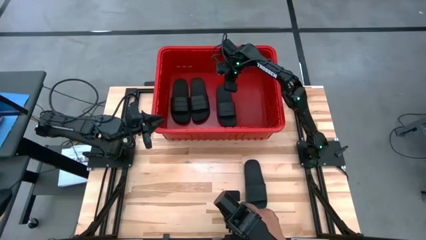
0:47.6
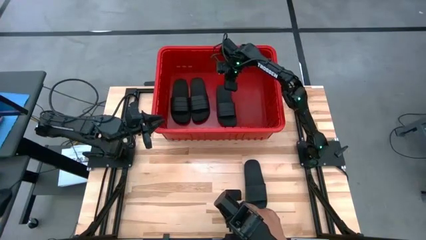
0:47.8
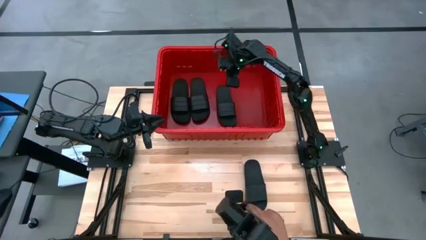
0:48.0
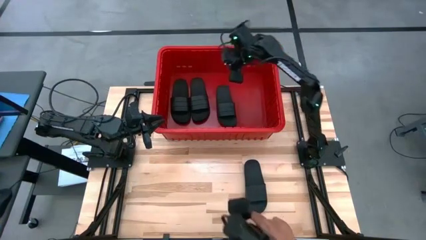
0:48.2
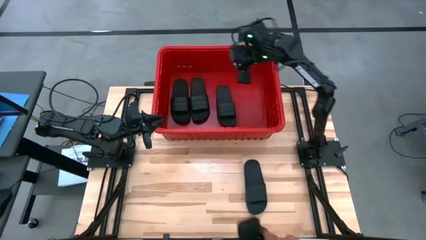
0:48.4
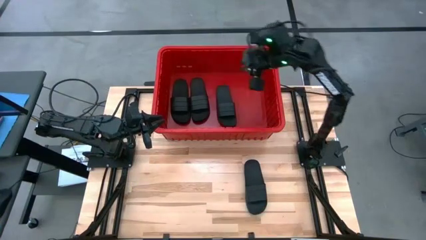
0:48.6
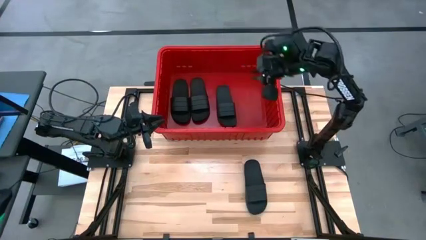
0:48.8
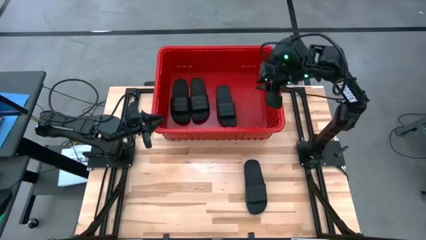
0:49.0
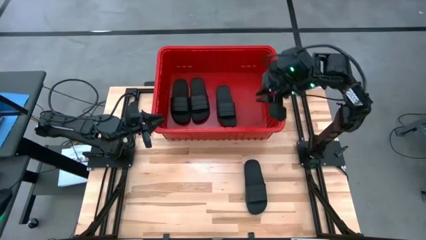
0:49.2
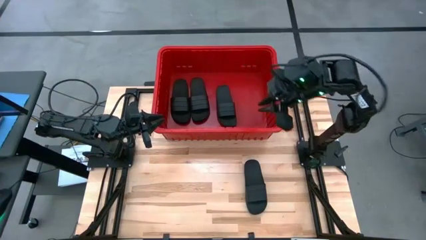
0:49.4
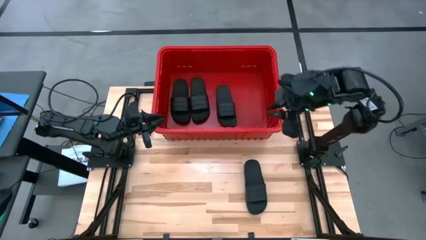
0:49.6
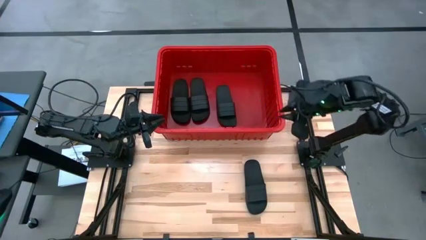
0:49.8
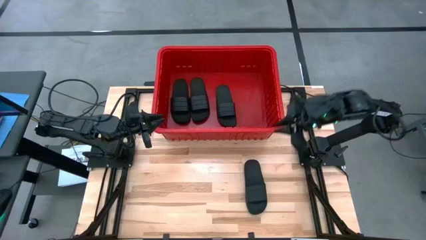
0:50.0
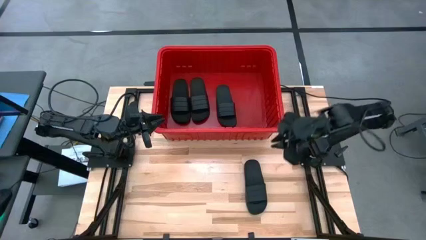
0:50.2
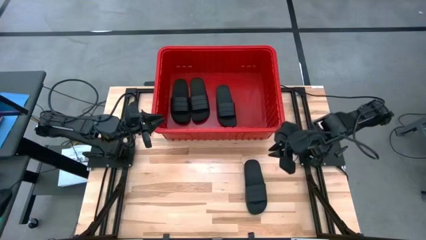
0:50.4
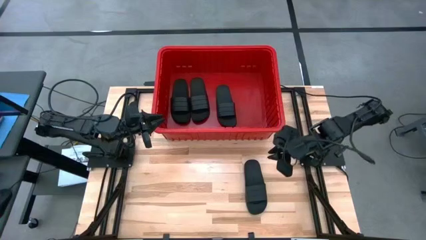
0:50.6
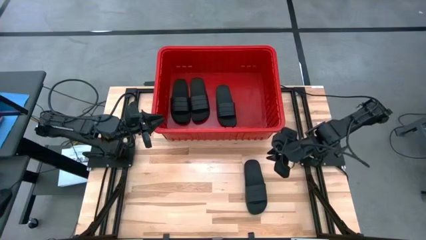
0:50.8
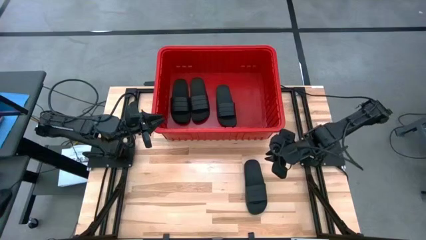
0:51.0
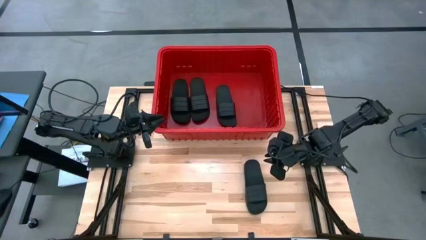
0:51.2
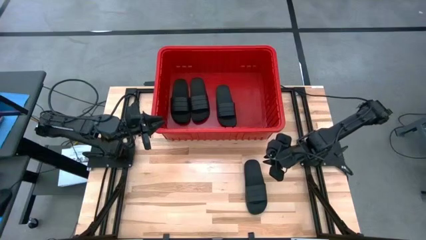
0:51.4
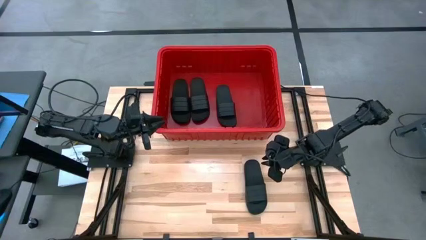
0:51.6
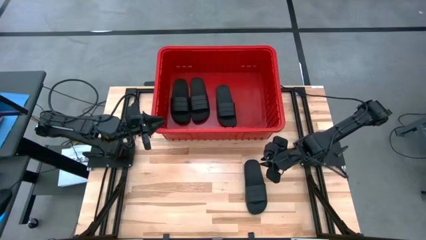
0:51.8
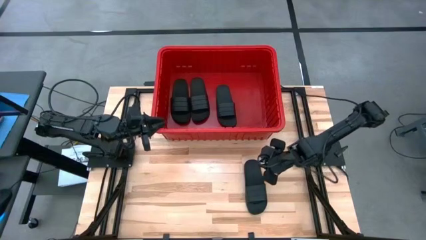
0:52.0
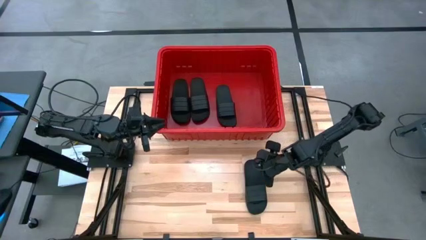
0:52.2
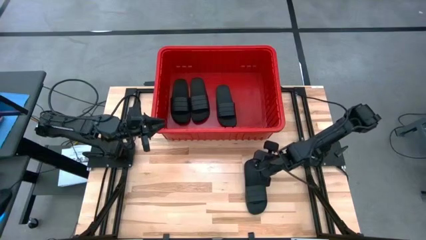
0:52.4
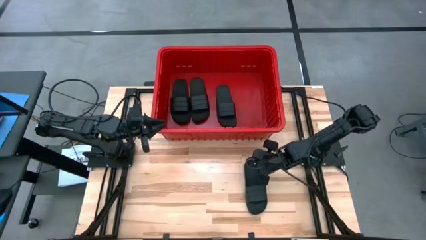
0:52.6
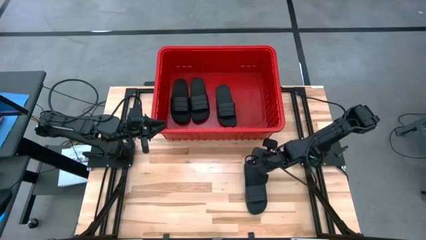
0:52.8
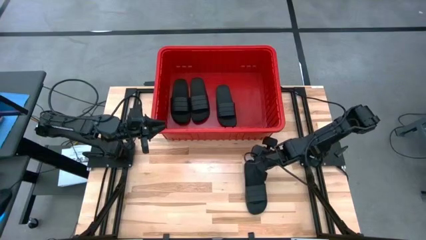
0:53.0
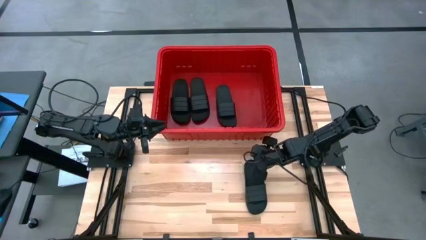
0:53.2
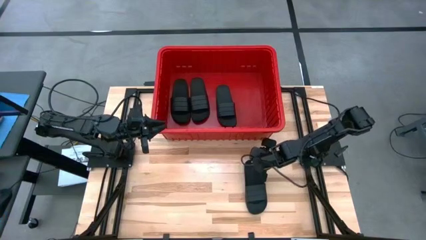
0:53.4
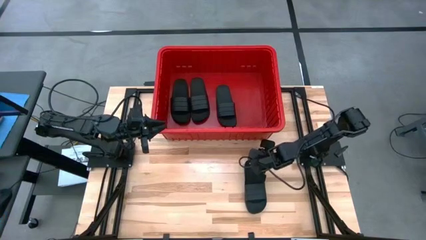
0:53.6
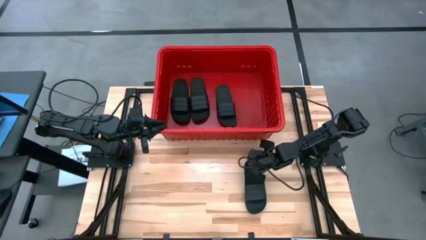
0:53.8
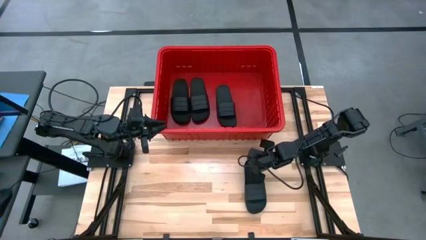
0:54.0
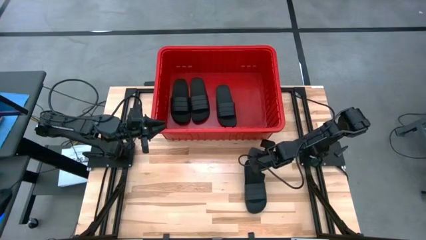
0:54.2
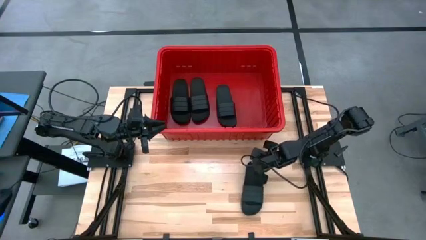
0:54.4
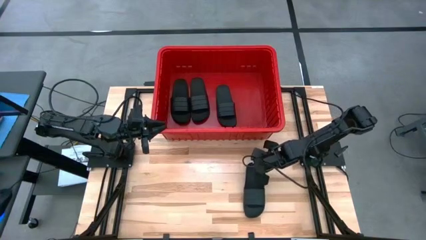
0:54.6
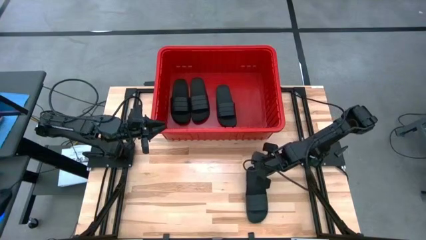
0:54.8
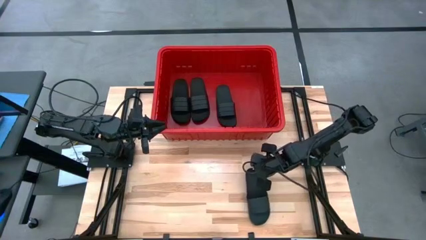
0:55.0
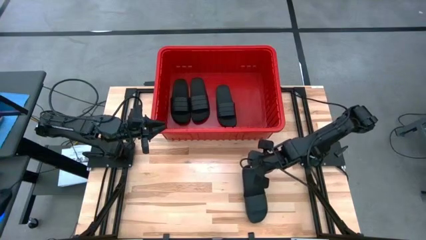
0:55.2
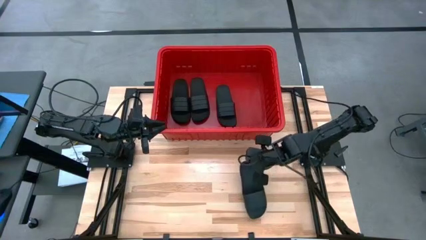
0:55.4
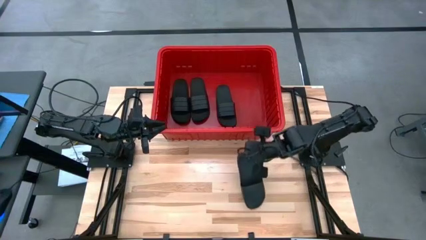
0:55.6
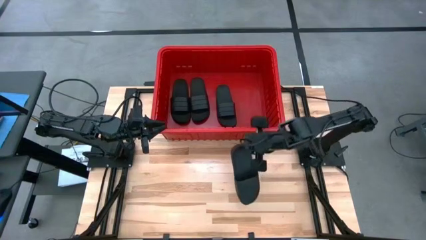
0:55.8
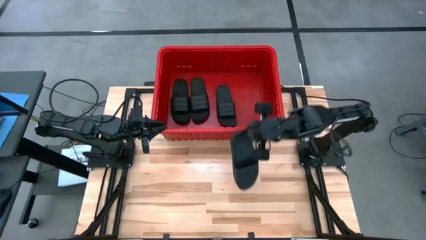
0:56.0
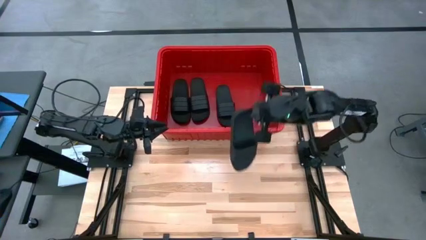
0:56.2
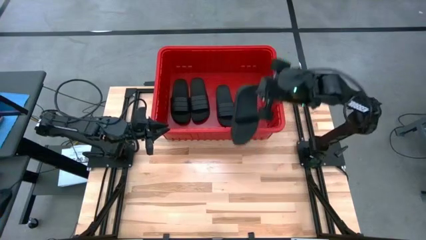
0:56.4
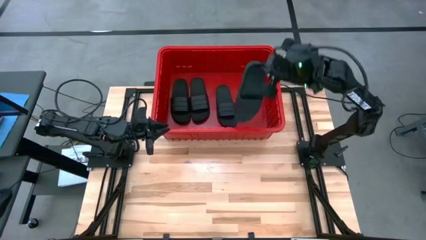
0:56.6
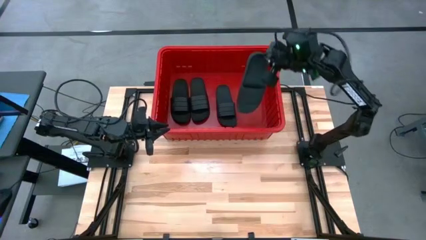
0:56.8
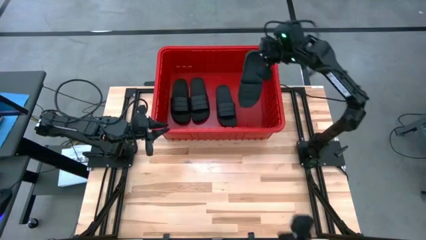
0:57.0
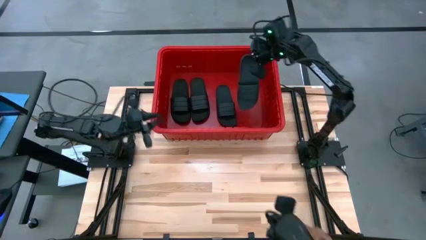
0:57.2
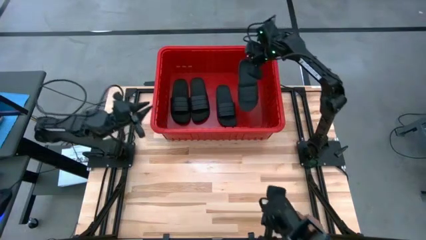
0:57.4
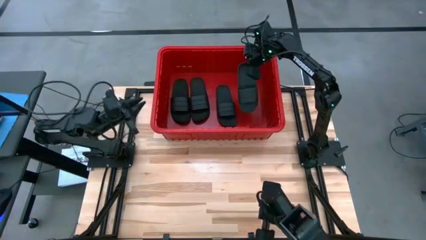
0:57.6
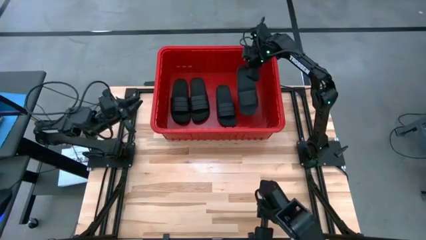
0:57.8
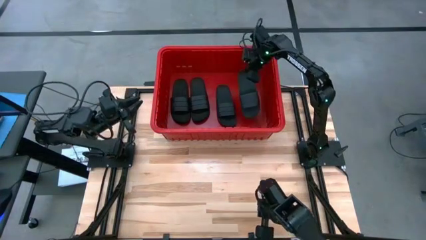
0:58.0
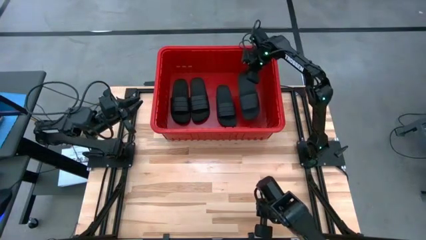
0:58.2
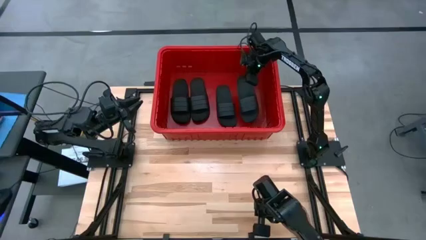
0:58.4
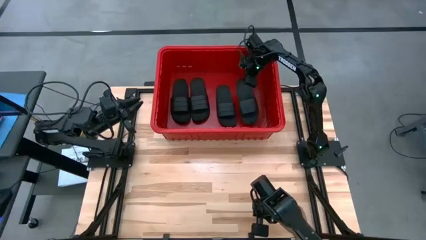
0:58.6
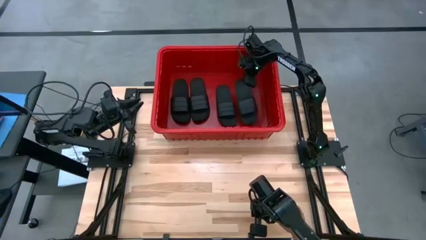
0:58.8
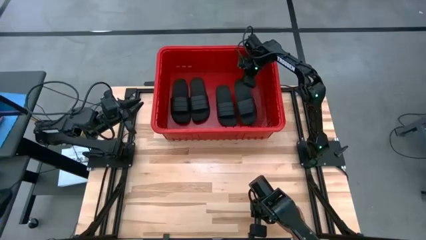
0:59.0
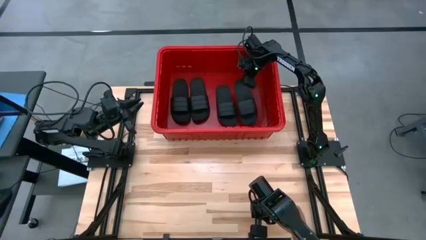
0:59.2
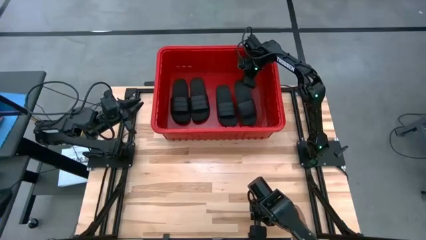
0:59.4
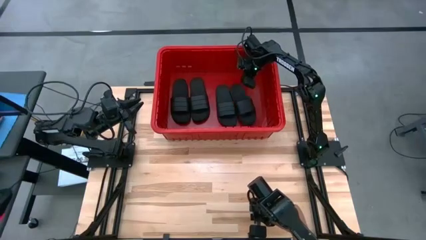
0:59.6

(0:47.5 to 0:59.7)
Task: Pick and place slides into bin
Put the black slide into the red bin
